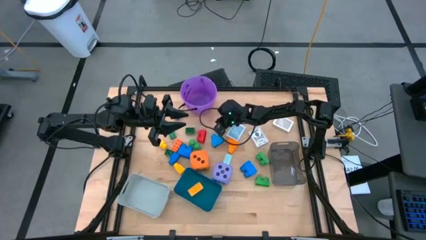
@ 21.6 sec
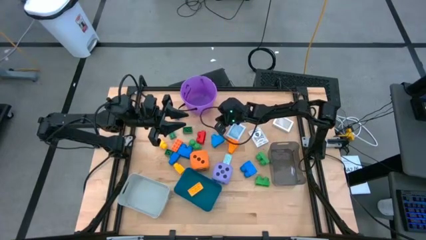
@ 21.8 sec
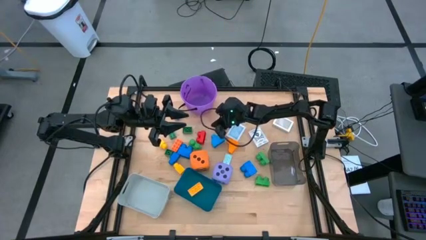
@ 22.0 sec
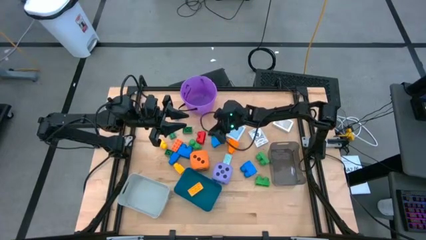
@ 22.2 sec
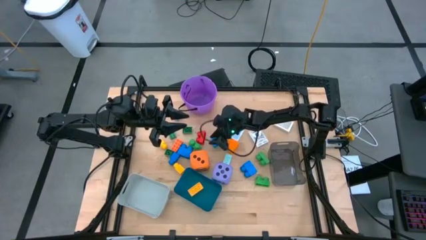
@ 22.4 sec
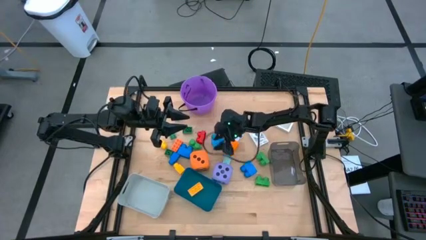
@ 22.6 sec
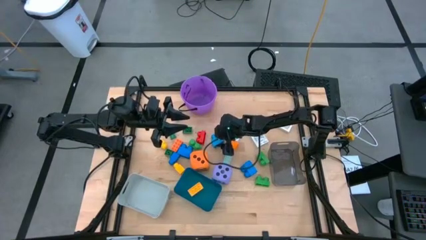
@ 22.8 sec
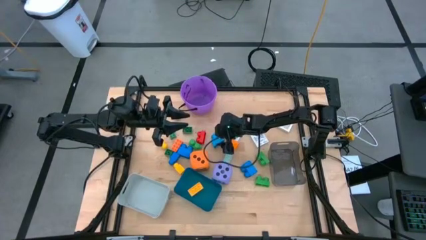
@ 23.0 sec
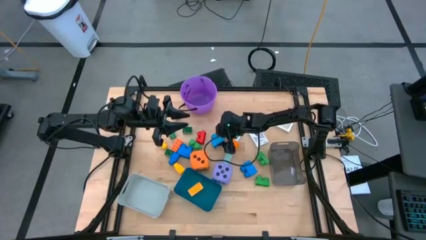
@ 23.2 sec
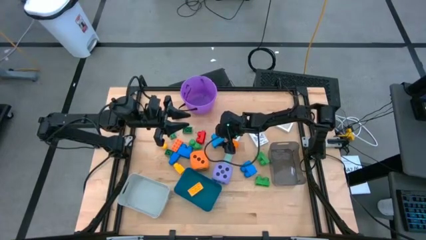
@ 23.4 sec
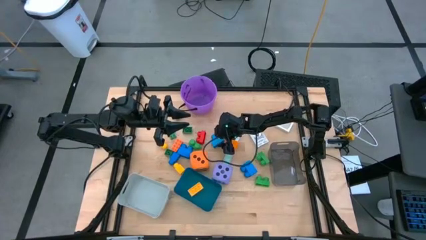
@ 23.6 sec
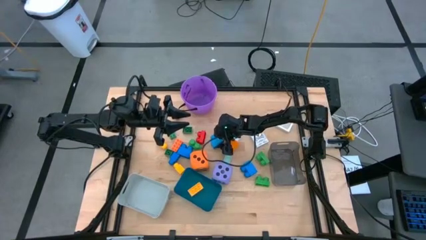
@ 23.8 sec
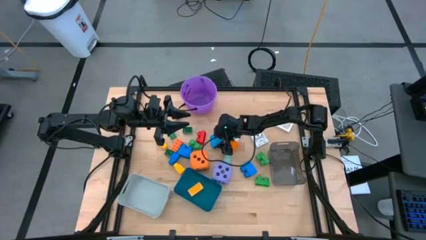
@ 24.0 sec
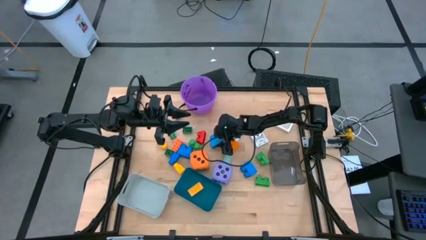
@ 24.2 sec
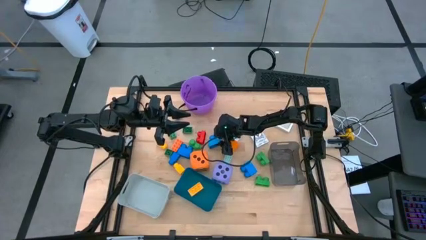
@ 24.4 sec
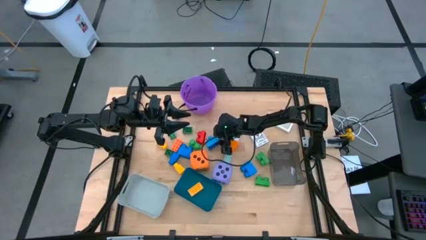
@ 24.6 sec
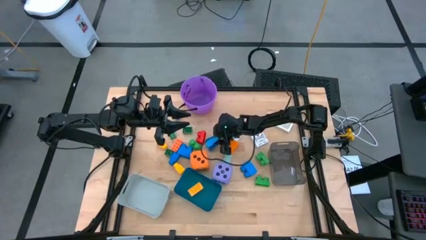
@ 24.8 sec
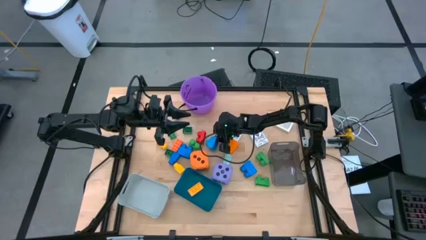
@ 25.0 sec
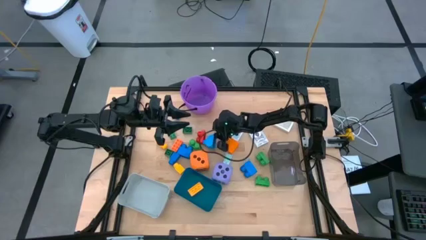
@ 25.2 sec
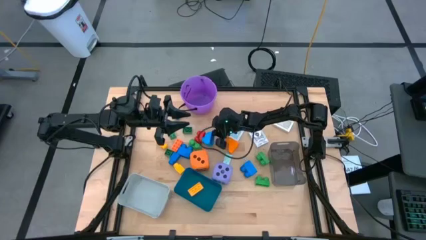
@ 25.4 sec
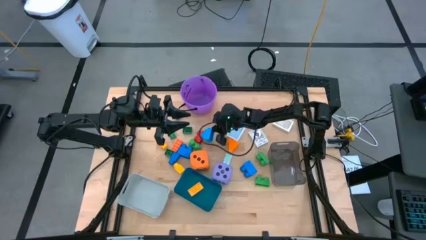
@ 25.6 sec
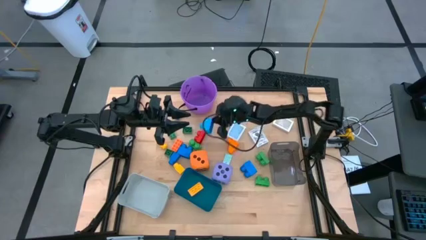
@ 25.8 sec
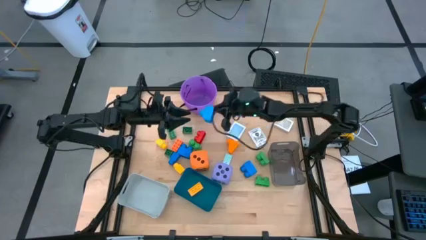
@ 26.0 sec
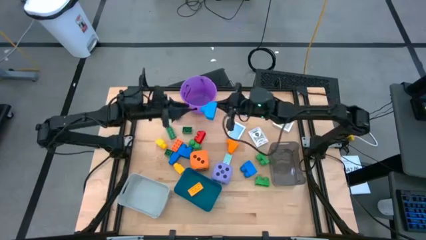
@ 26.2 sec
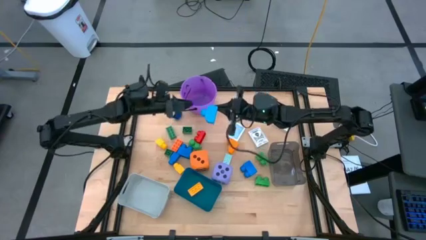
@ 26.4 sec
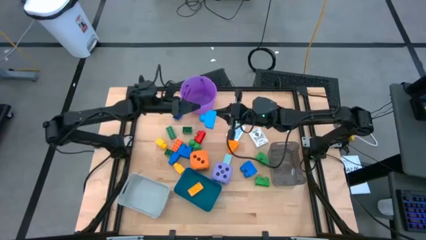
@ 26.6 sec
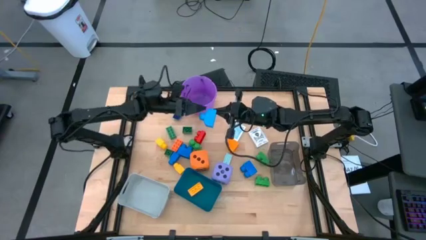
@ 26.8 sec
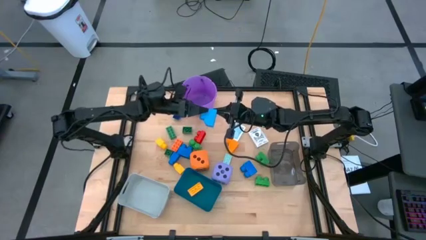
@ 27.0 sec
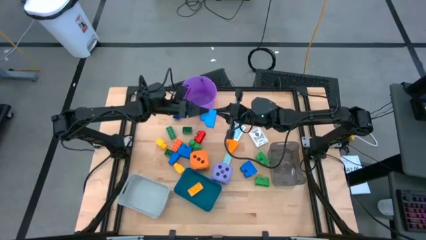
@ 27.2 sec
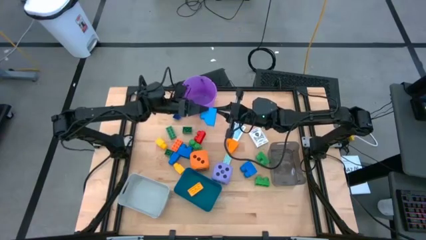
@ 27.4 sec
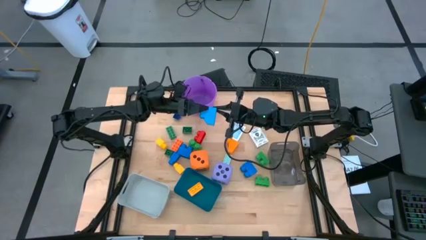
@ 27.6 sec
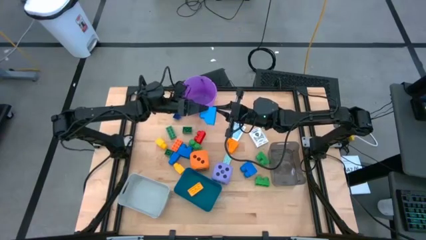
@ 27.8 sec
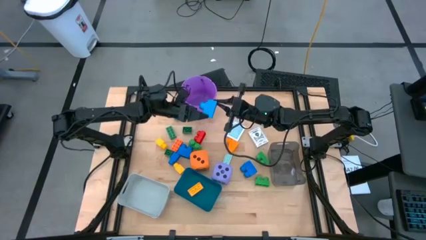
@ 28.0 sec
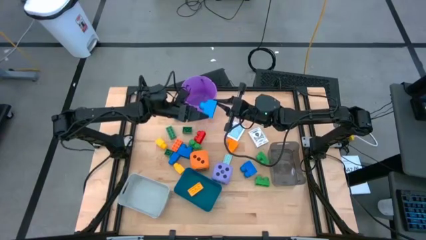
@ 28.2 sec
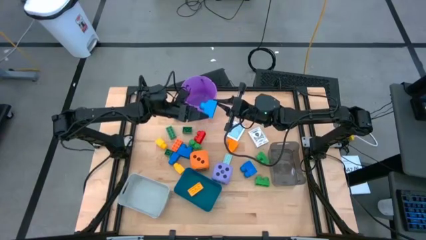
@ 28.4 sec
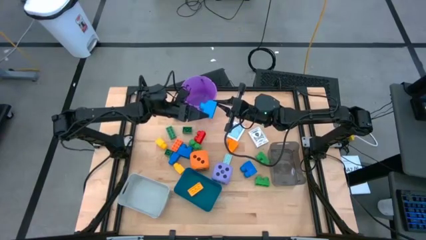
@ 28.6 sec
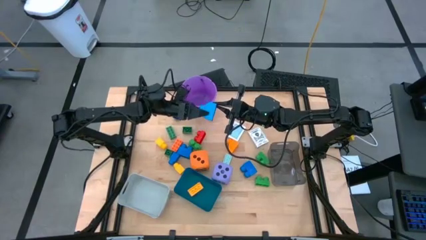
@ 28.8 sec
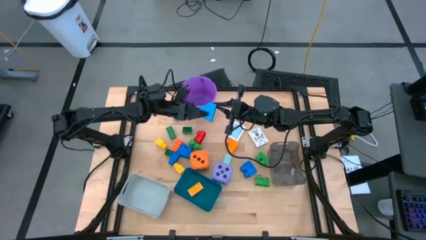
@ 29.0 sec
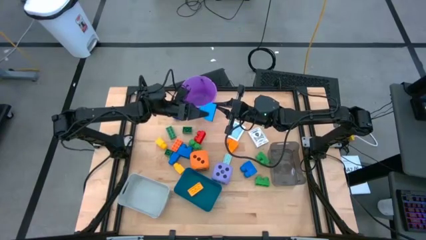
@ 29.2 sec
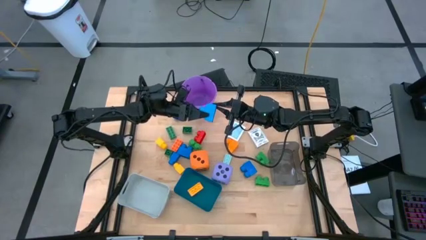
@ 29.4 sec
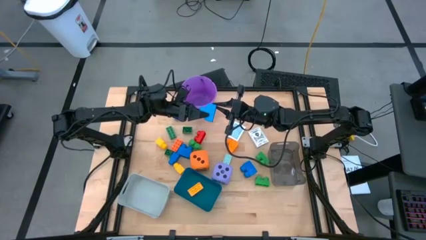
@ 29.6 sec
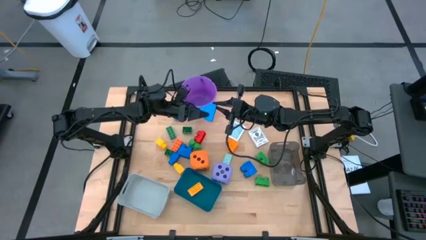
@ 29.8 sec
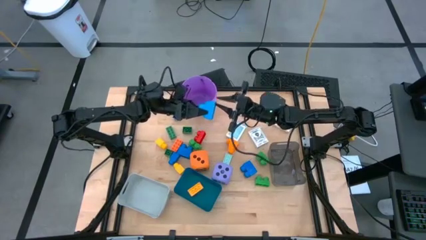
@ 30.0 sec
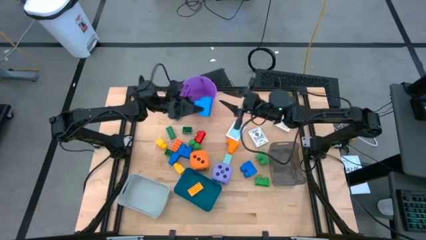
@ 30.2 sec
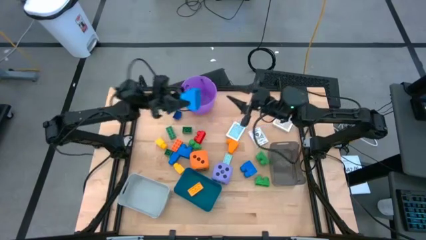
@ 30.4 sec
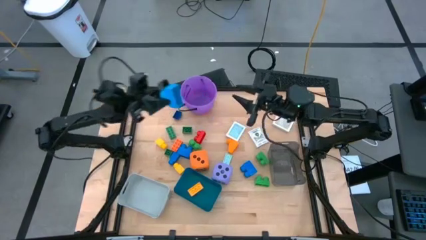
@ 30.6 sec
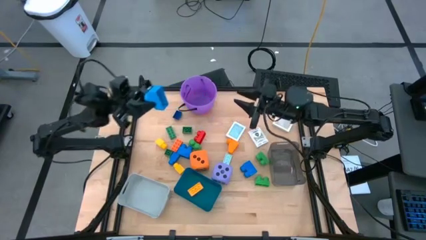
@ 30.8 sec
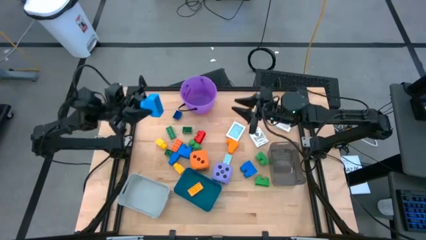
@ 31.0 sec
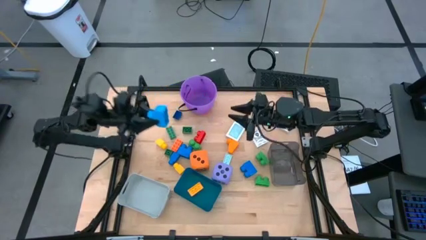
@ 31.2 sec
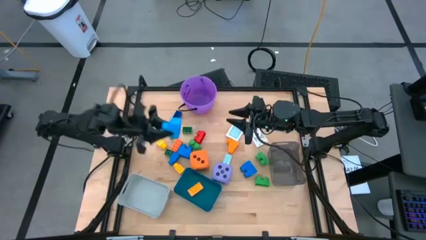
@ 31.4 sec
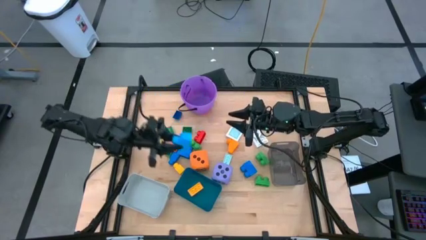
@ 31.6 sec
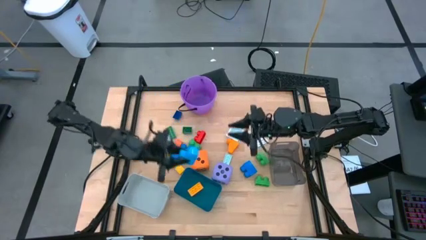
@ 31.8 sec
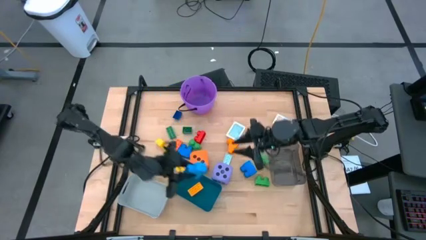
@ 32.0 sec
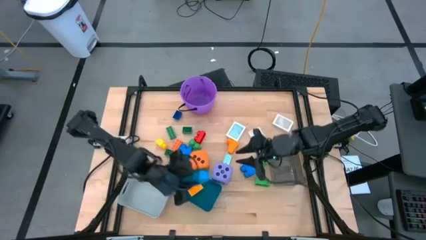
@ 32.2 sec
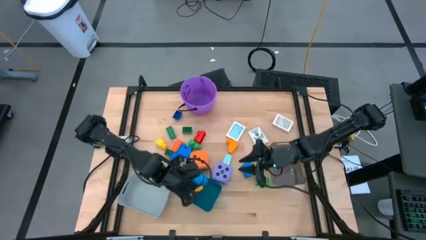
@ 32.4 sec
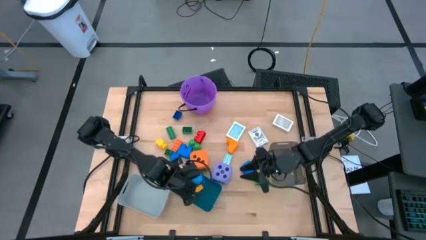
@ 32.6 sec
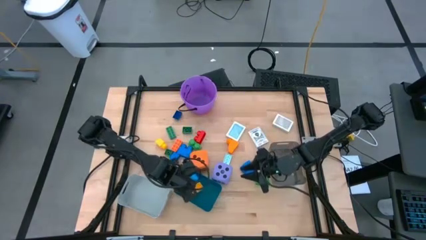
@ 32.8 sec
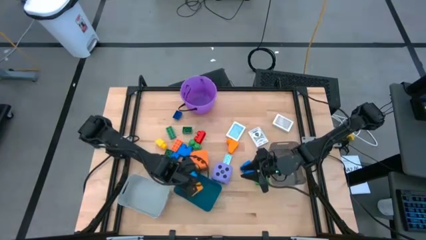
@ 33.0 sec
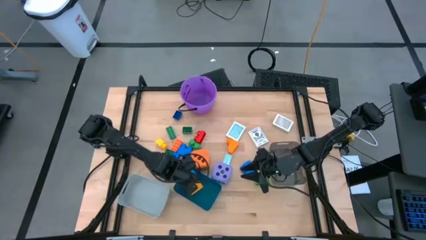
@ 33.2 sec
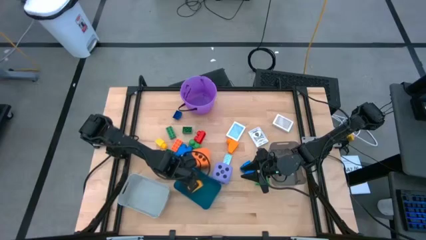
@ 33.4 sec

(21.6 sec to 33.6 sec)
Task: Pick & Place Toys
Put the blue game piece into the blue bin
